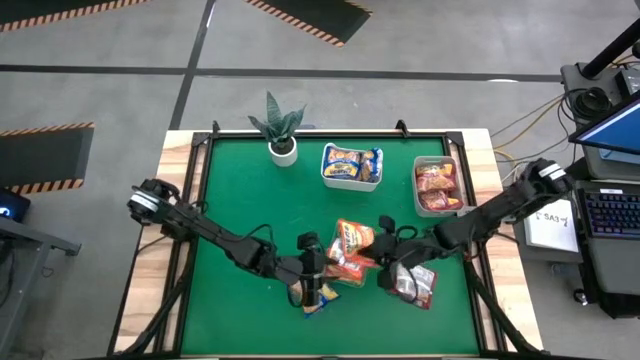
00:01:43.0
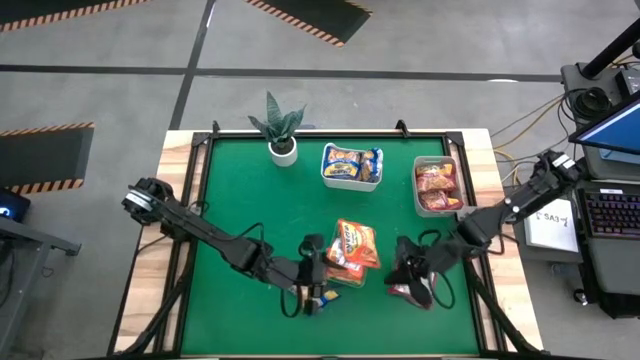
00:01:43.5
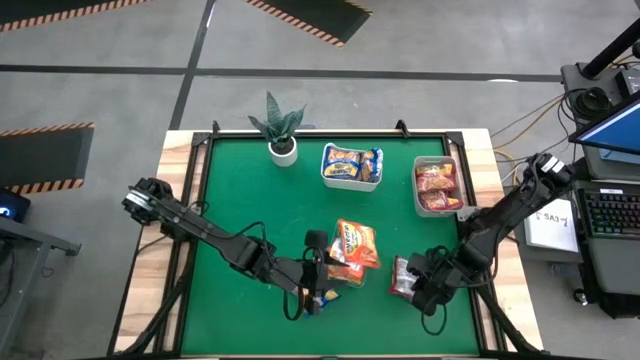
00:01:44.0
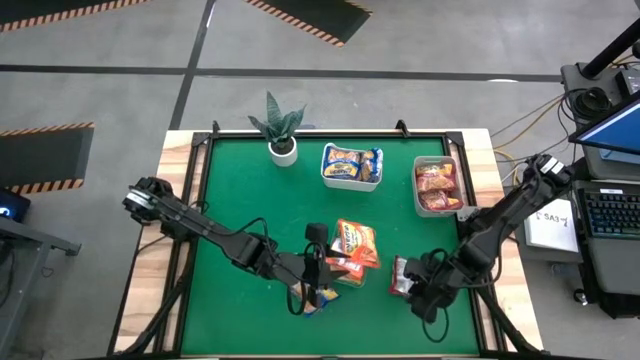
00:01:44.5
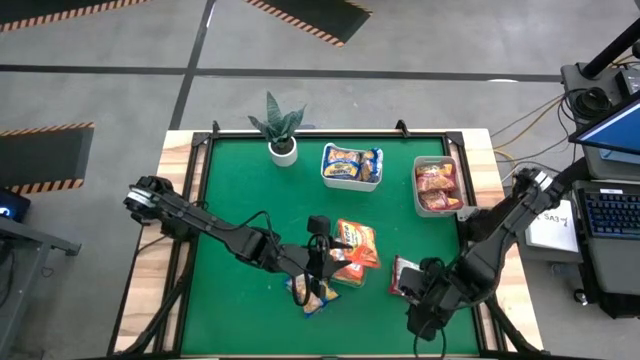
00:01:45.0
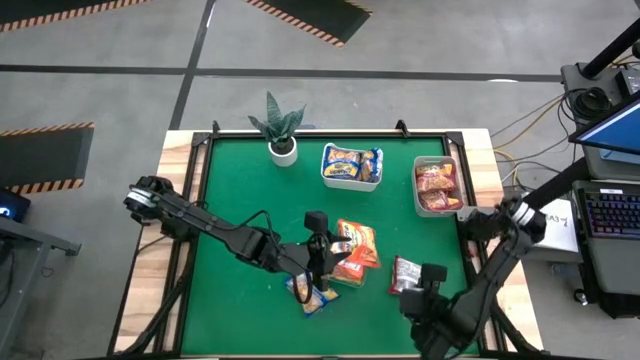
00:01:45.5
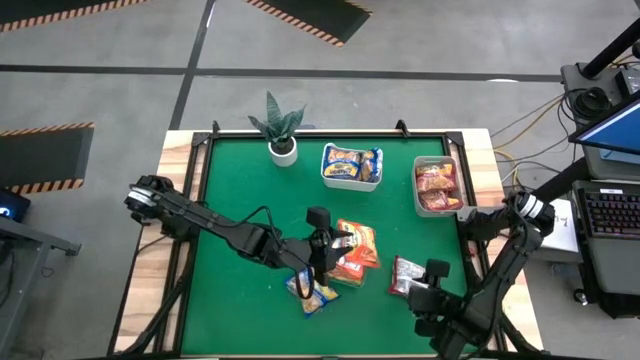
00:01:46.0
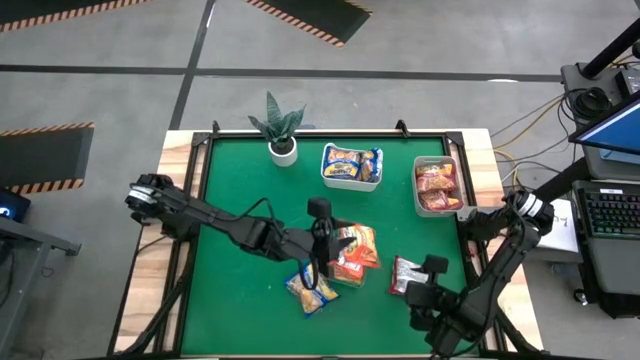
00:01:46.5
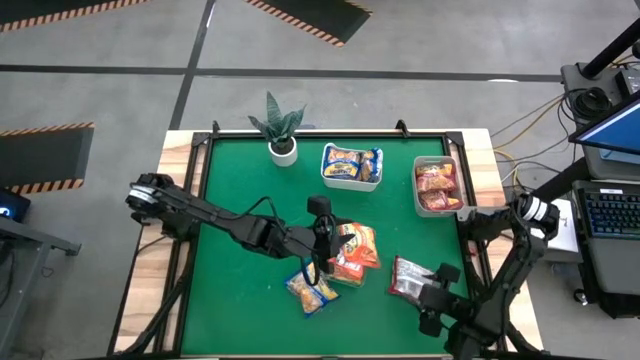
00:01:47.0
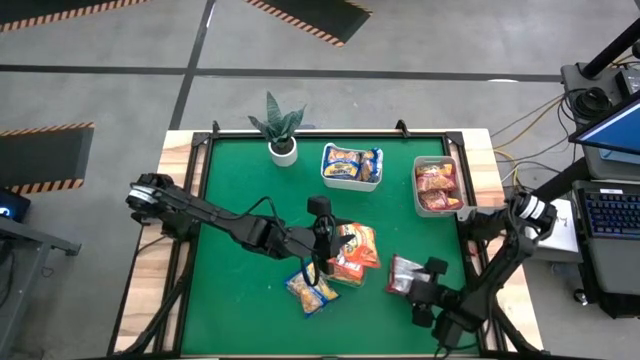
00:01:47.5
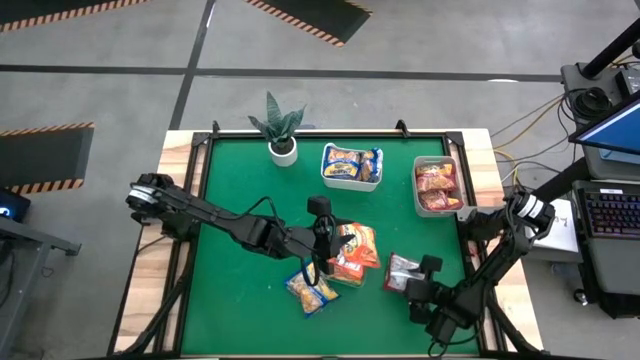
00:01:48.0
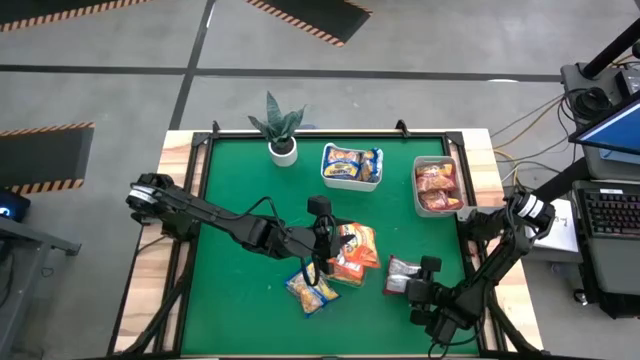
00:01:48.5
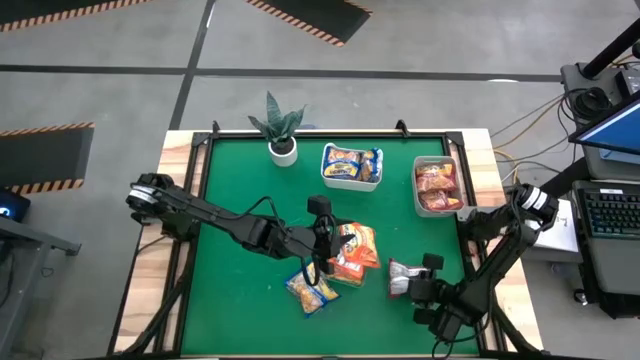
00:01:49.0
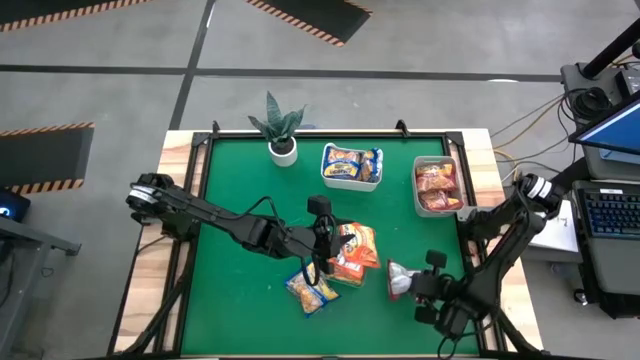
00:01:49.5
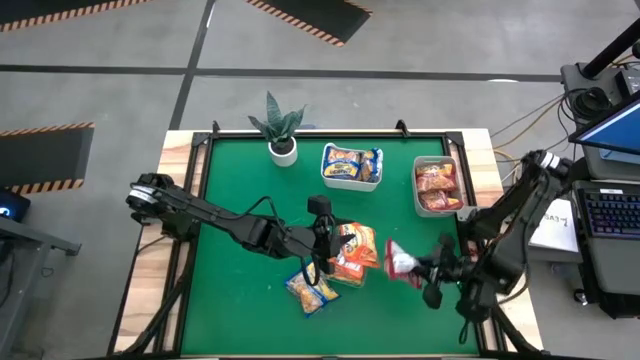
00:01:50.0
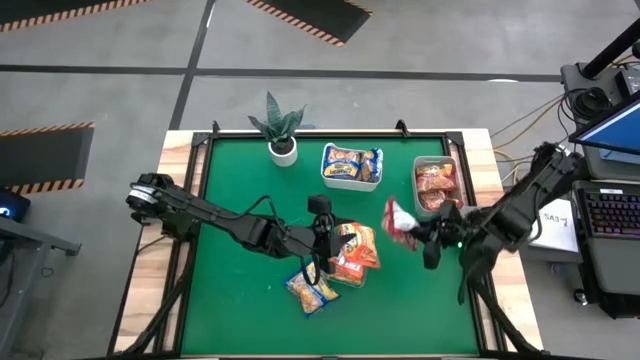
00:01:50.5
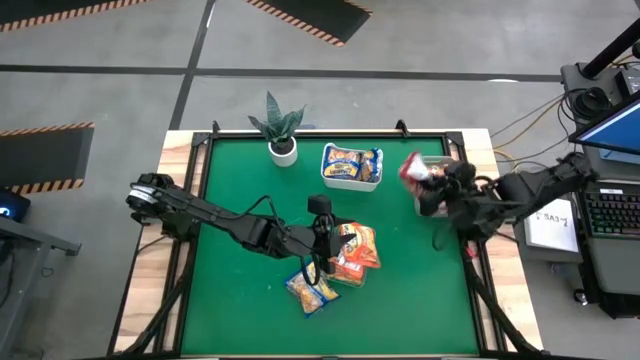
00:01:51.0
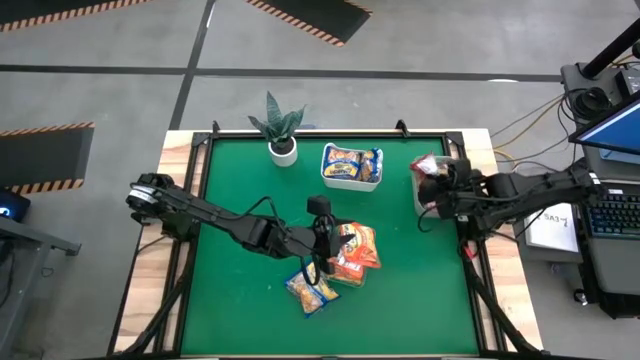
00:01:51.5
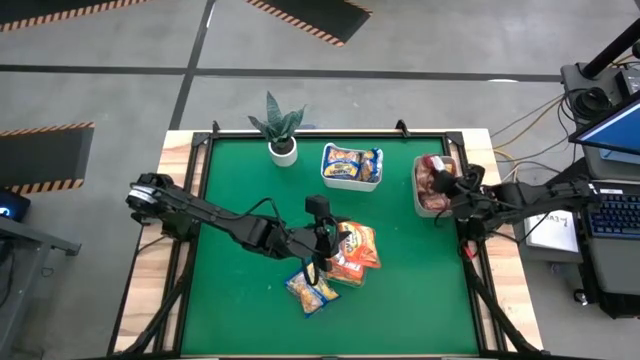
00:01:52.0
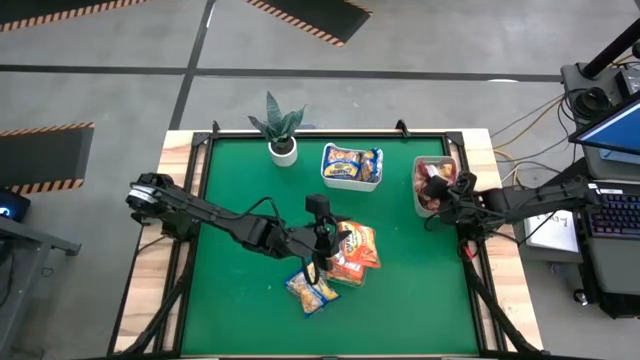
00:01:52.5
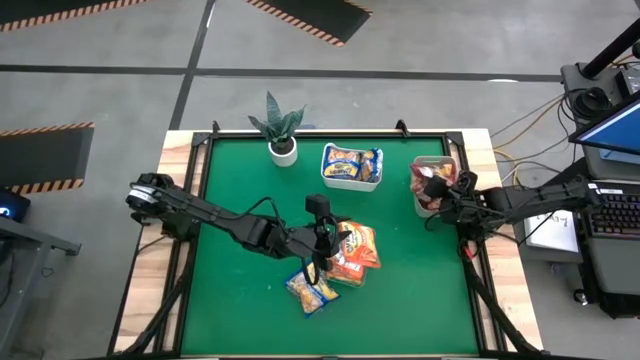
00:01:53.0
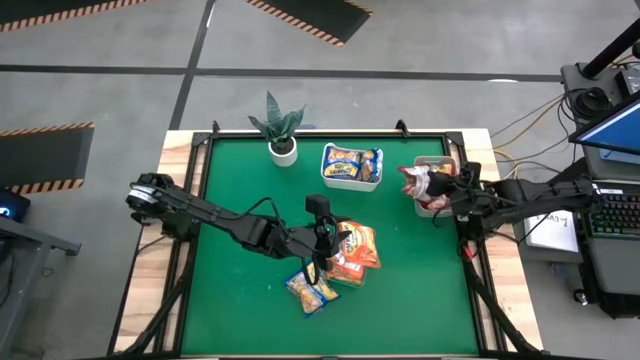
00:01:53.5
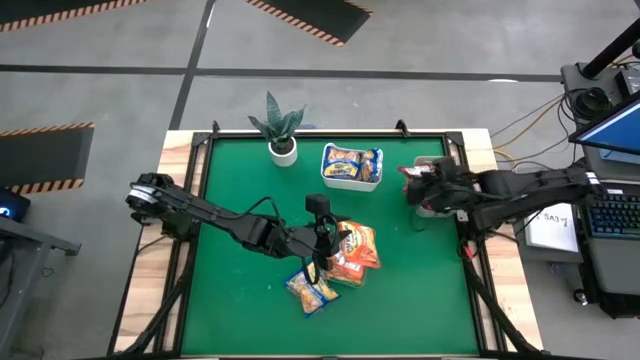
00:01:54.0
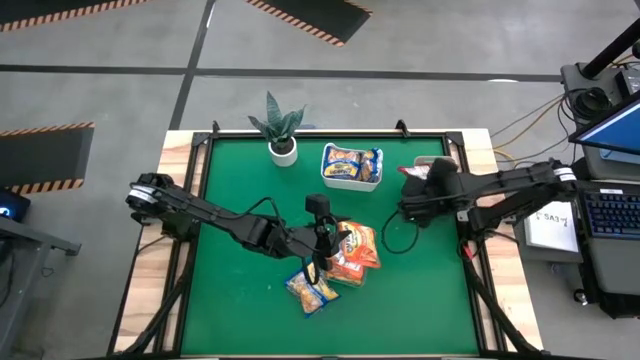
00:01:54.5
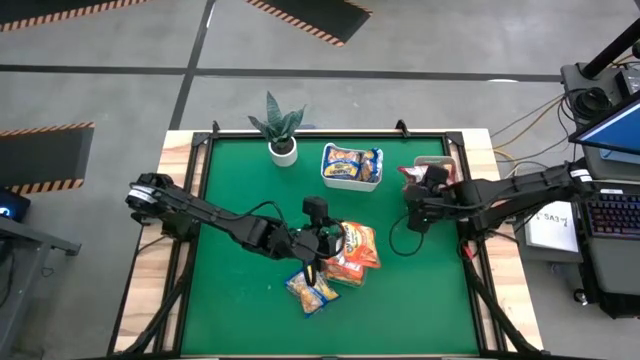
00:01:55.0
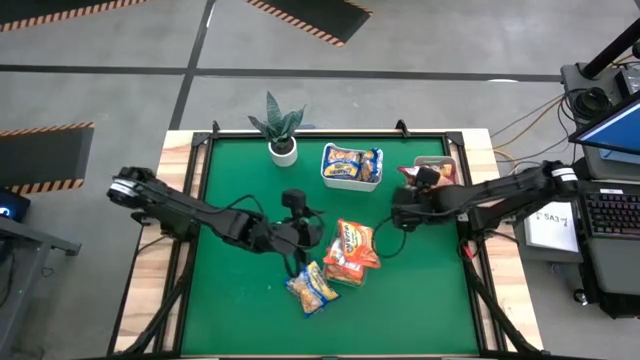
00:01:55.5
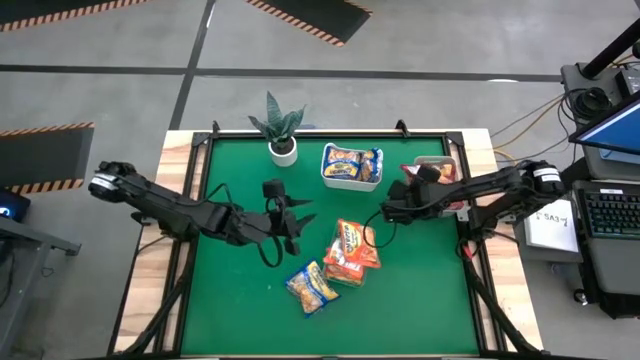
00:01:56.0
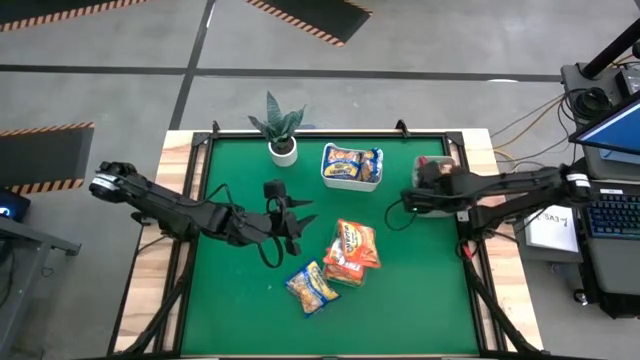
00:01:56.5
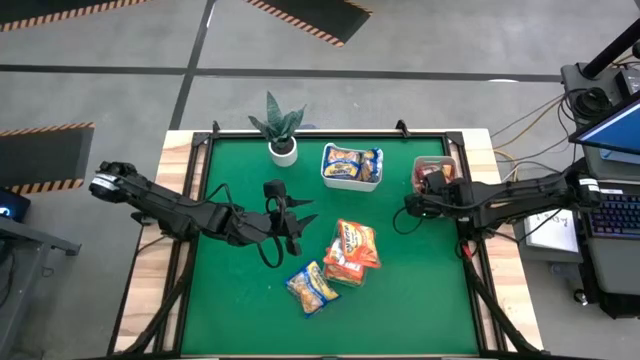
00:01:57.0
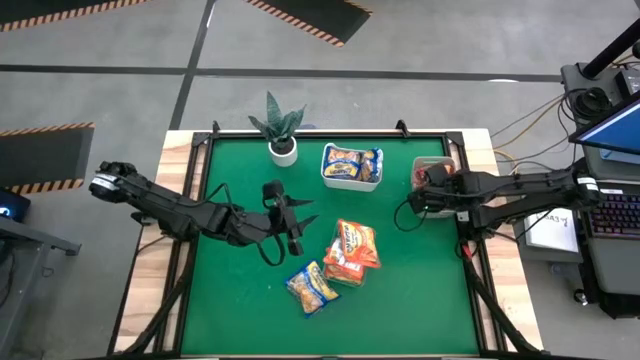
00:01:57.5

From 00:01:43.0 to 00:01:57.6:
Task: Sort Maruchan noodles
Put the red noodle pack into the gray bin

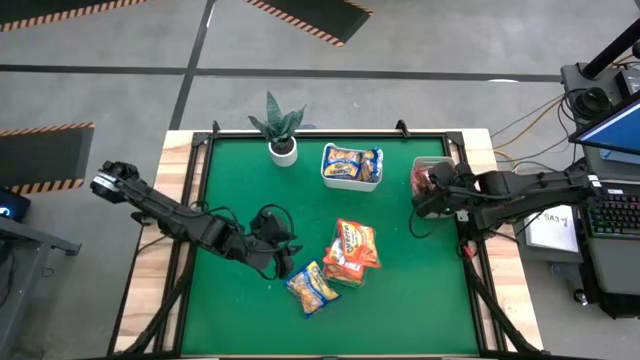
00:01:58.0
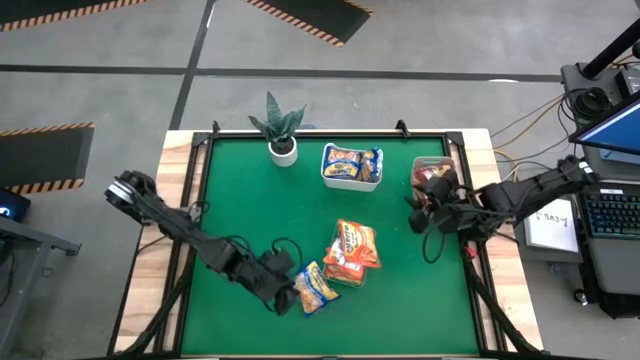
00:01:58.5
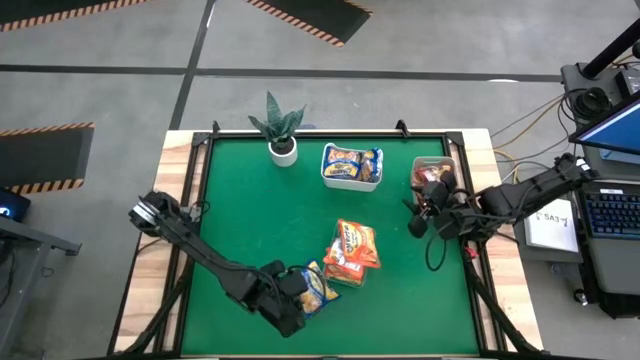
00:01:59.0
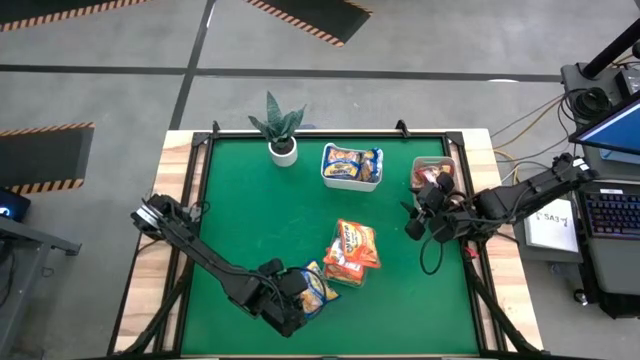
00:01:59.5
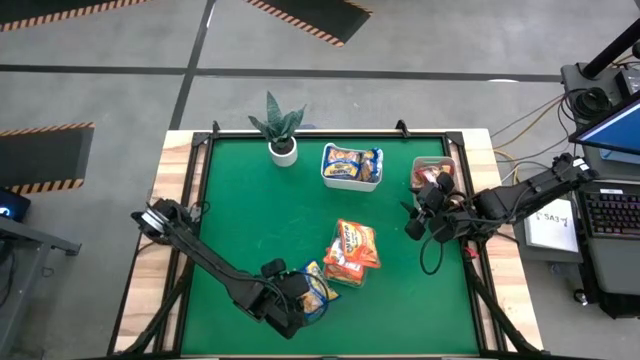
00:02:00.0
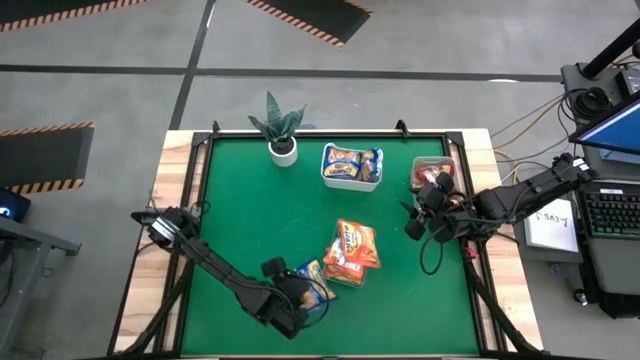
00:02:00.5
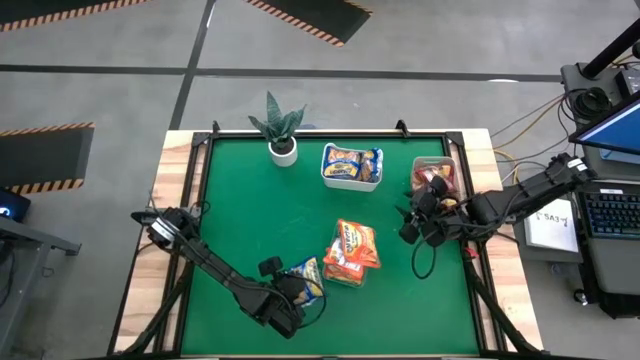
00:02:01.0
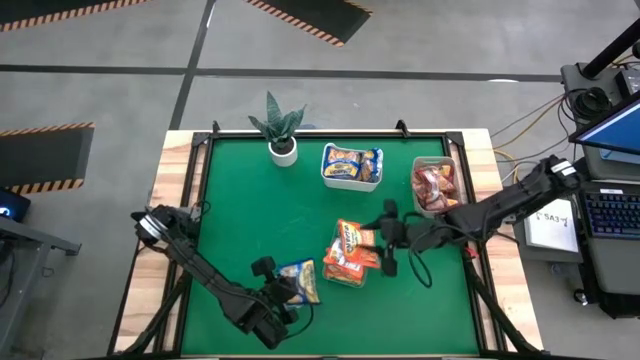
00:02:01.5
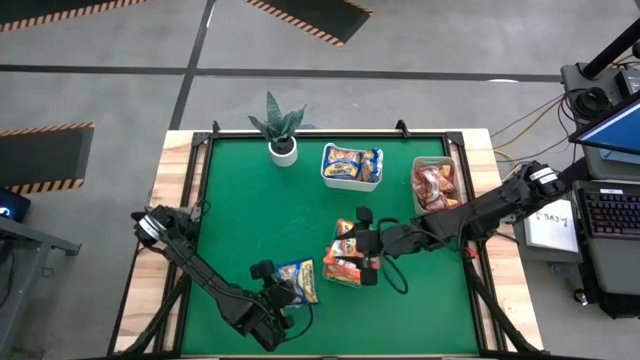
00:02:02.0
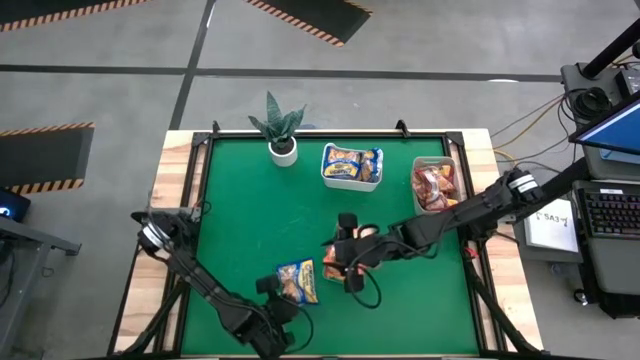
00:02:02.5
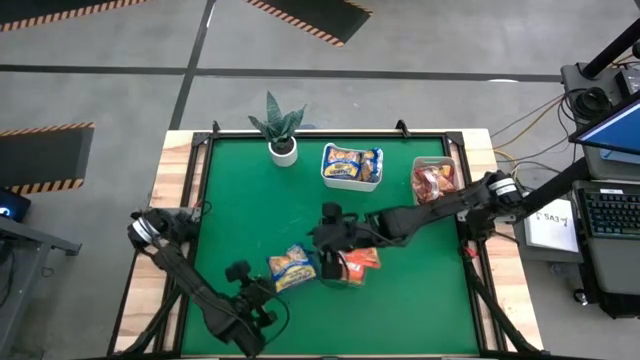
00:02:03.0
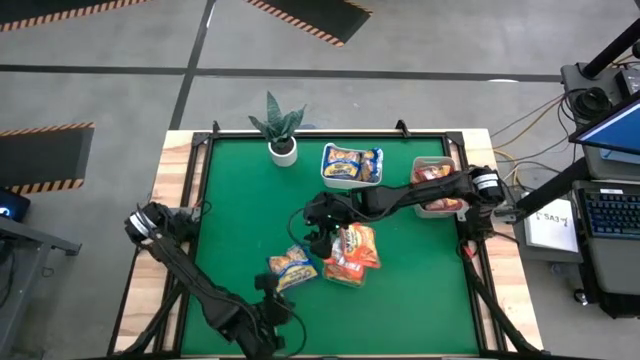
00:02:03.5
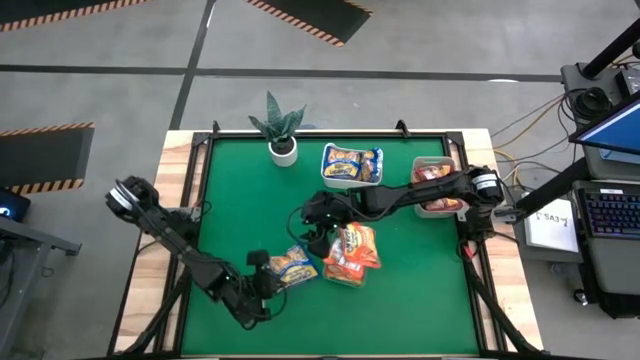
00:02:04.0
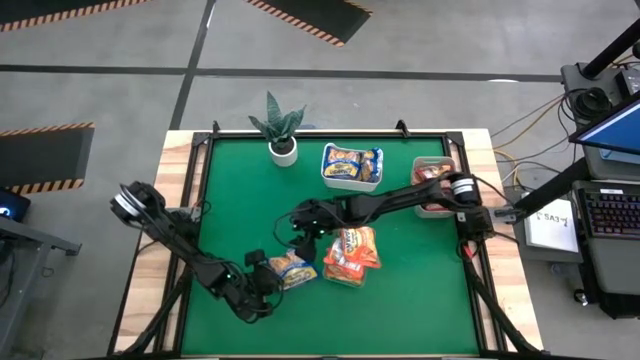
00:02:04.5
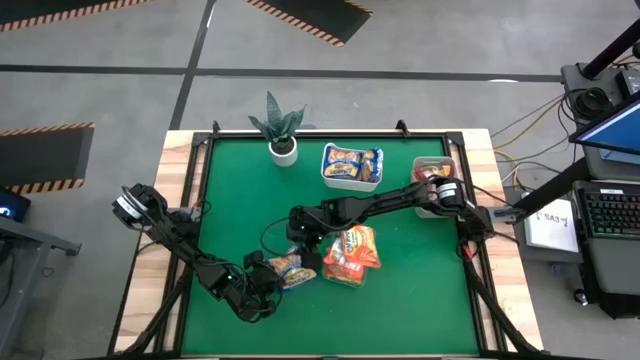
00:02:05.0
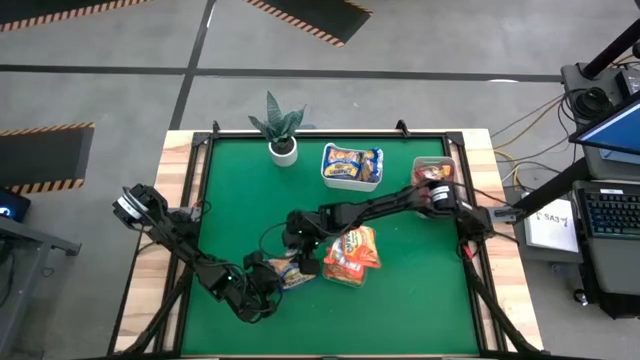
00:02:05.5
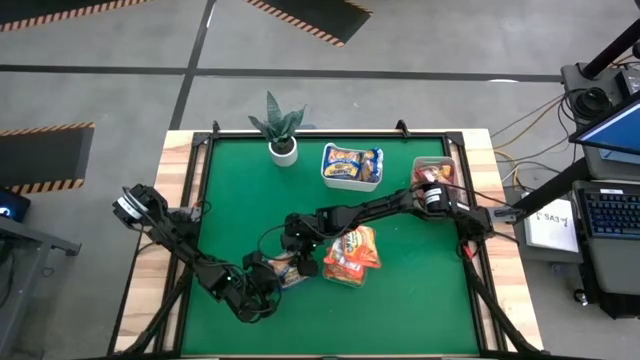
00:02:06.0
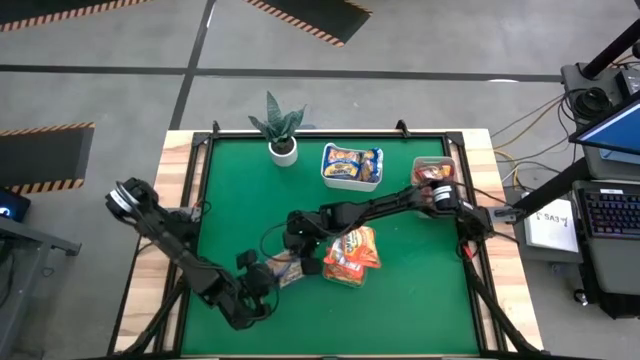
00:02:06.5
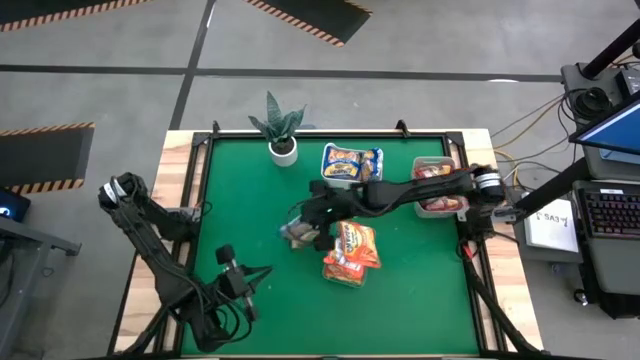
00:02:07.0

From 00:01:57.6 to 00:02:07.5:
Put the blue noodle pack into the white bin
